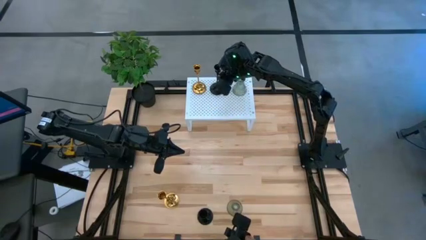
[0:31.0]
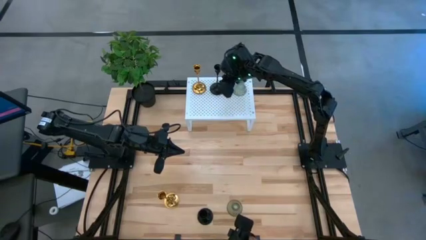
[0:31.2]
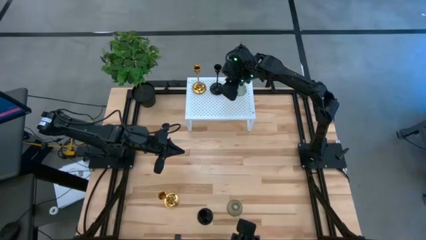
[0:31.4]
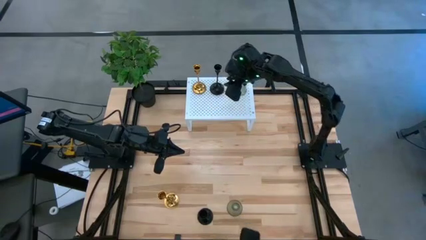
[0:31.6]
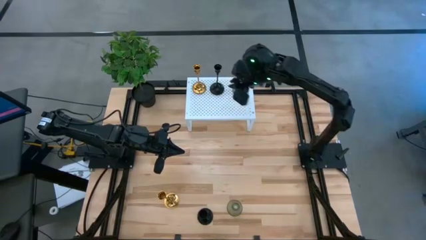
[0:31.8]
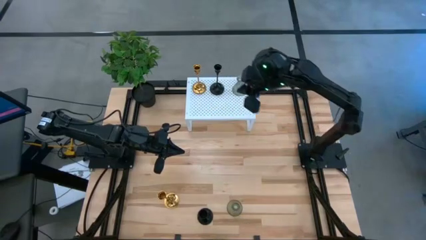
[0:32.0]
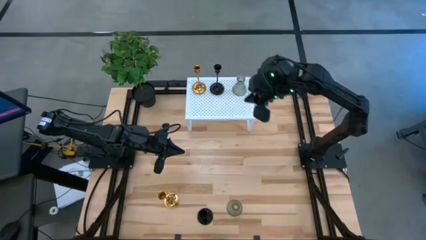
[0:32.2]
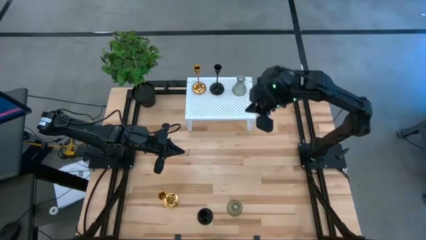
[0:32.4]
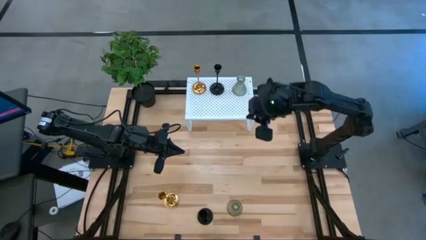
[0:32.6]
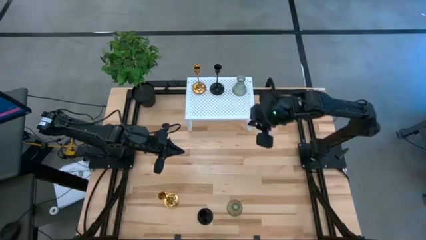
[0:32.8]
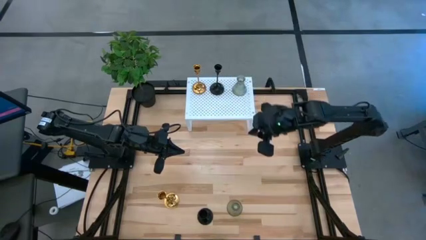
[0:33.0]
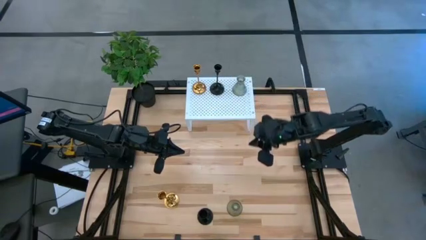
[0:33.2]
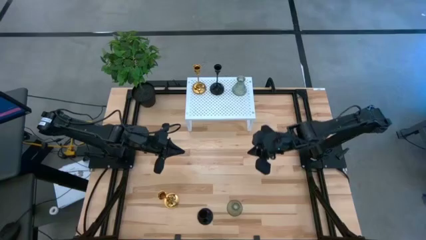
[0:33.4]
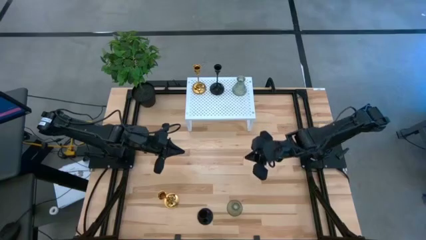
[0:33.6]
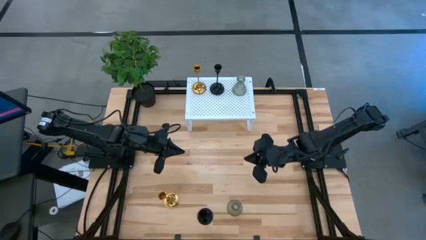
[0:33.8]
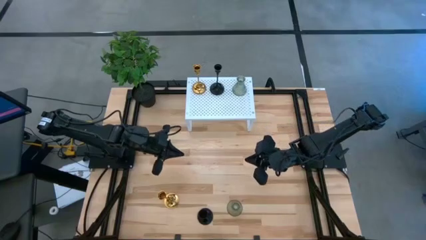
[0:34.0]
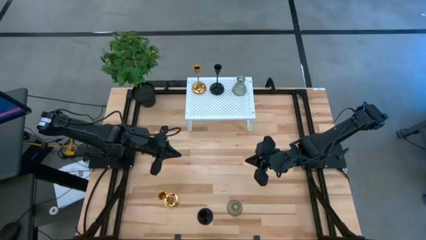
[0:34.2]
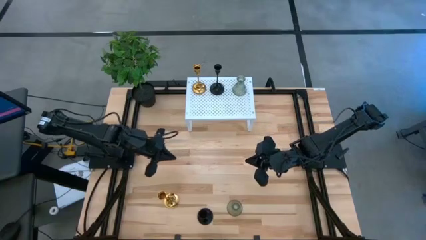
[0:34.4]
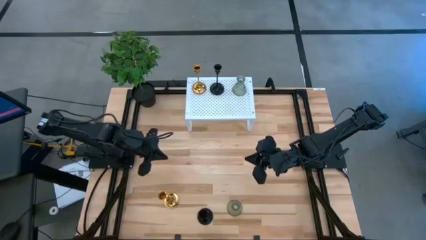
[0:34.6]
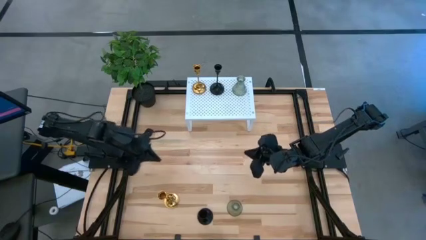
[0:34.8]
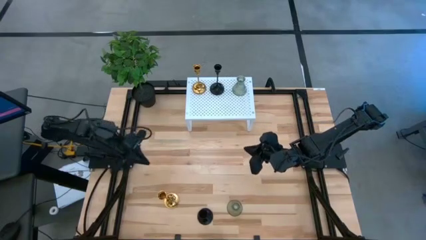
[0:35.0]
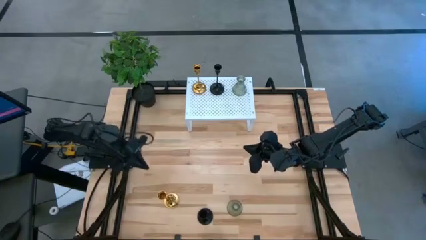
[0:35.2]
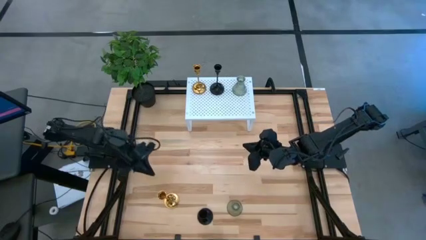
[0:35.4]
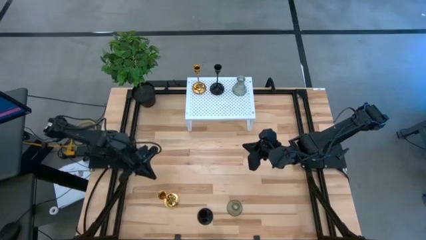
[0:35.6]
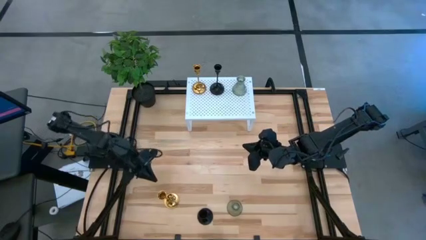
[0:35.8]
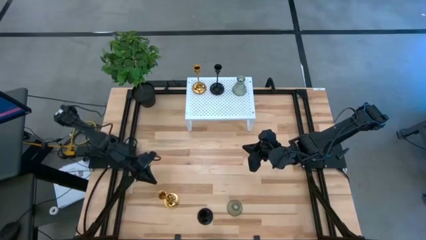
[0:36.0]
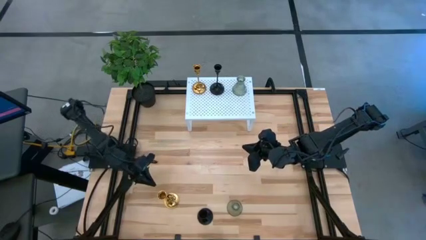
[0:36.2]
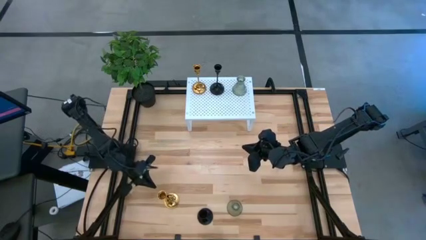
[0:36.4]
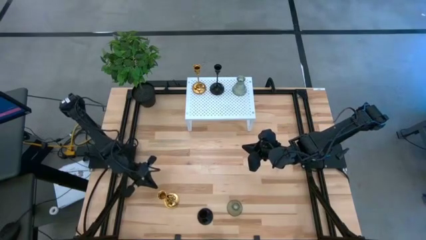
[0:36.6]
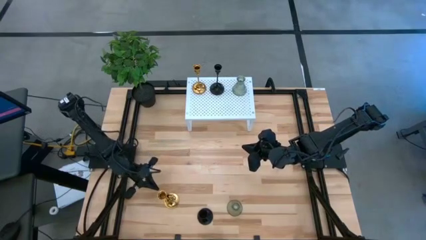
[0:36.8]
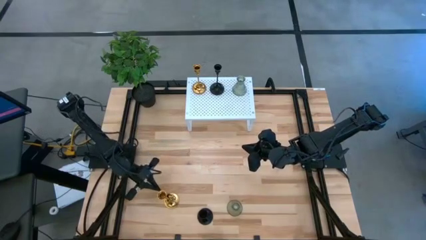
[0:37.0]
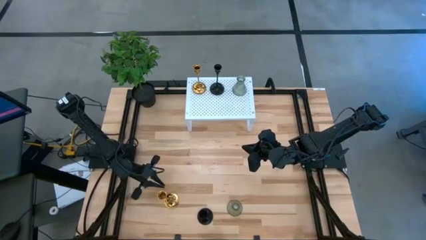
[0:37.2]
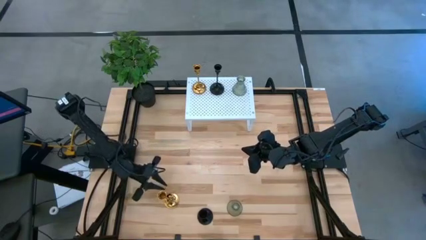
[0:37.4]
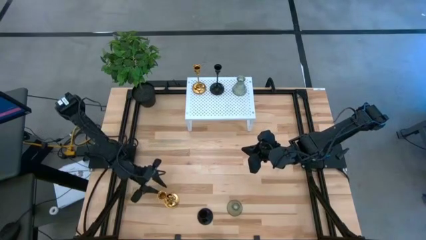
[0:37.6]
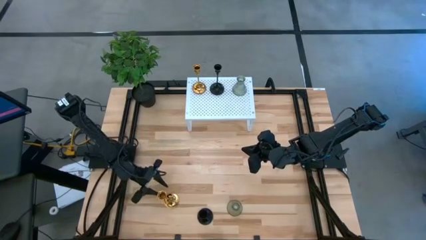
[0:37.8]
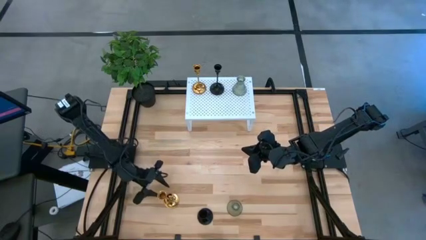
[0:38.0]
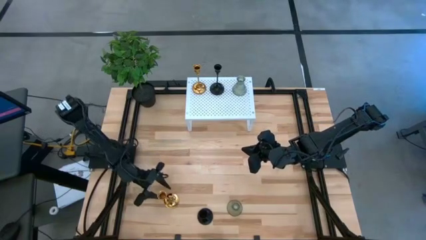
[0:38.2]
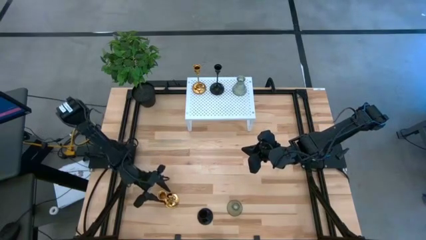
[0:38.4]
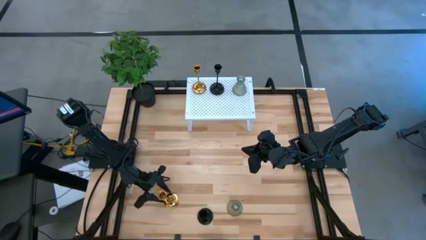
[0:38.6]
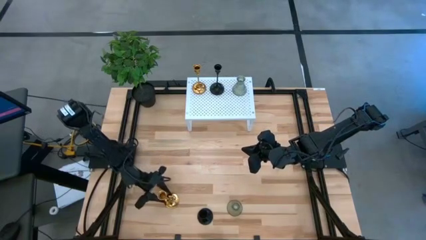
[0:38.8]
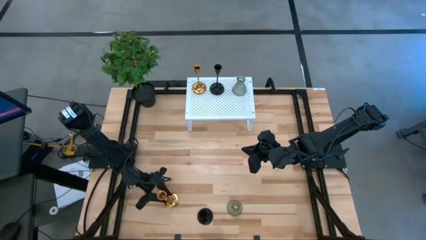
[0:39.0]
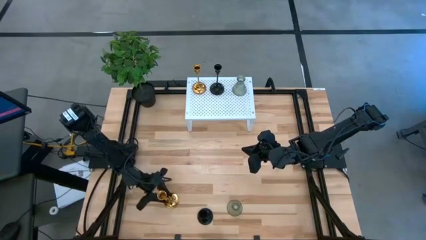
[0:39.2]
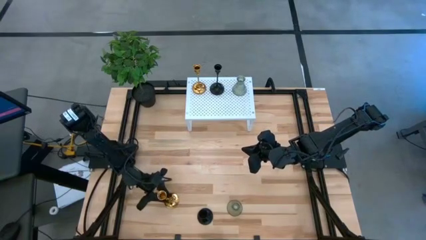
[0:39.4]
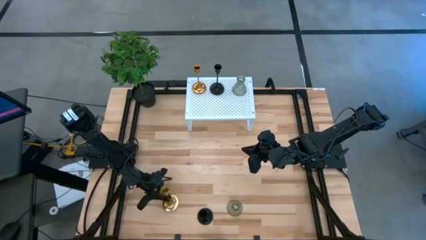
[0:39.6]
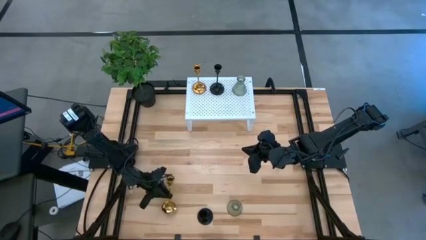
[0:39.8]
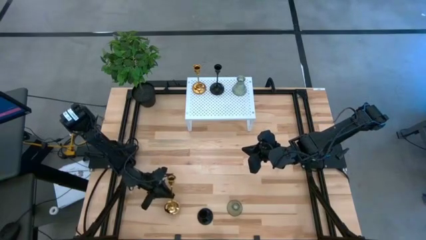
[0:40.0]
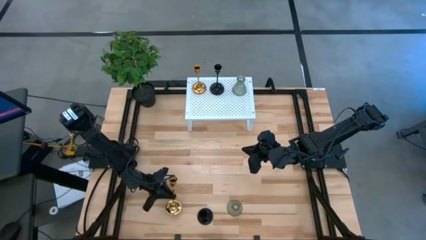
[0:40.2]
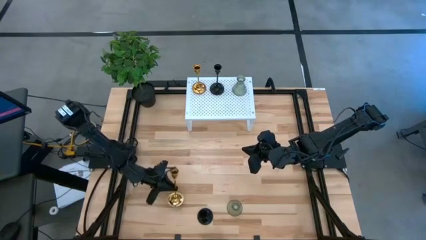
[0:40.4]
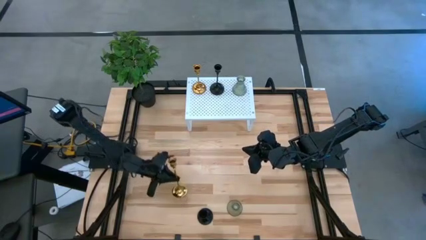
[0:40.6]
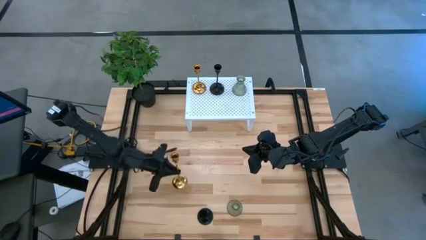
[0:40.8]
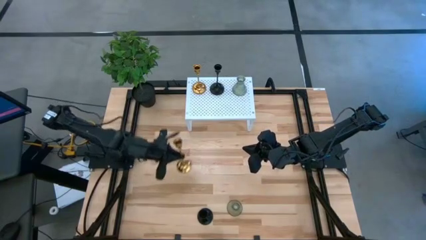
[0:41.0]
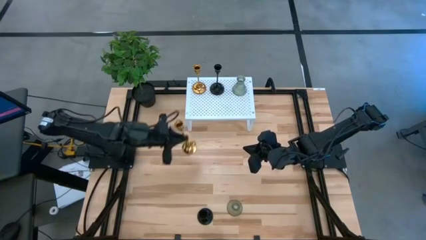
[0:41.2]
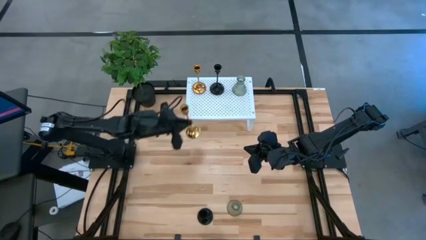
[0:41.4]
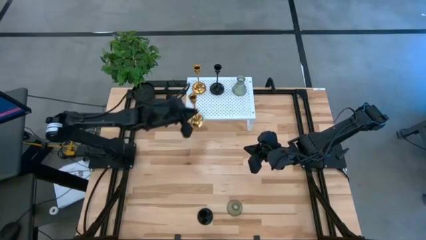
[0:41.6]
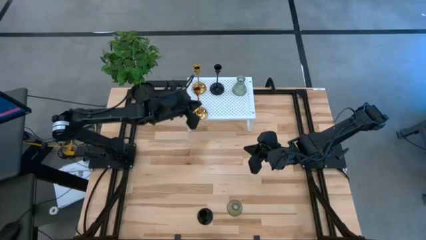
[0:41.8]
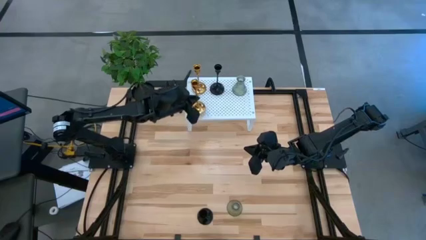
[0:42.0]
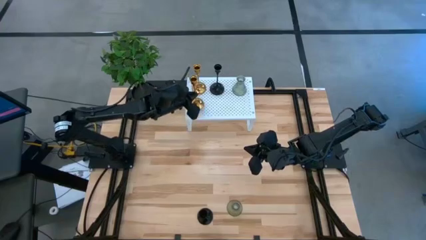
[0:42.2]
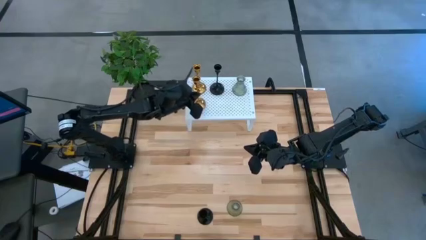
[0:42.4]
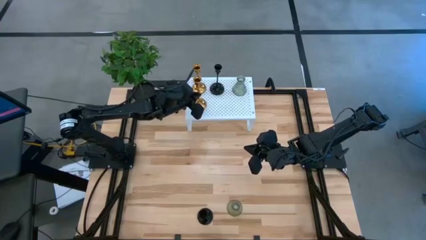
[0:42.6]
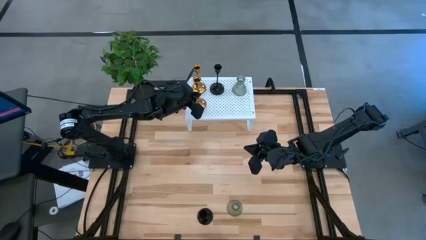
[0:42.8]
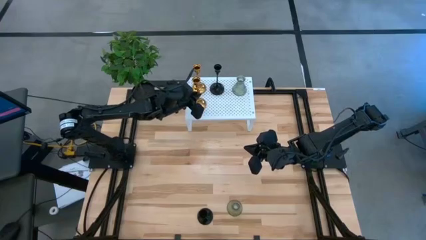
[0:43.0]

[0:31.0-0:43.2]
Task: Pick & Place candle stick holders
Put the gold candle holder on the shelf aligned with the other gold candle holder

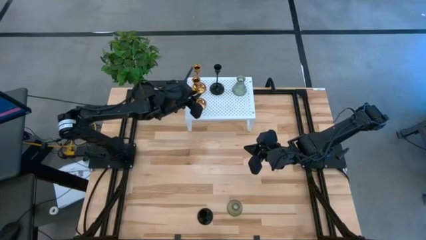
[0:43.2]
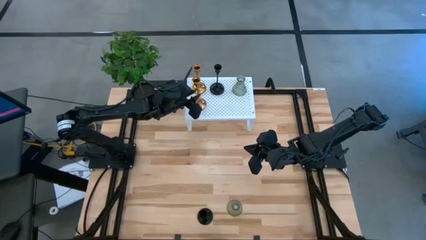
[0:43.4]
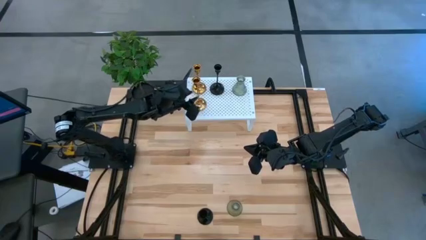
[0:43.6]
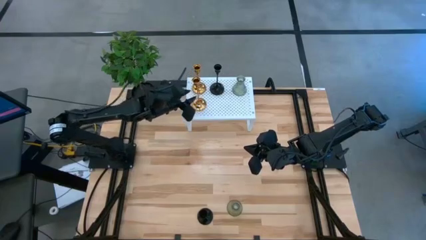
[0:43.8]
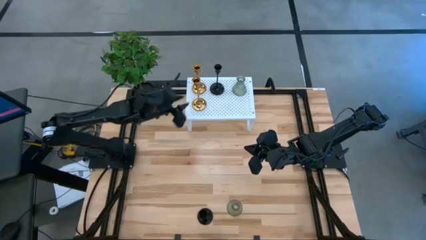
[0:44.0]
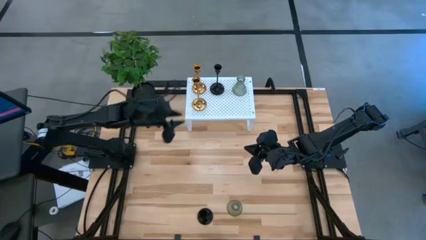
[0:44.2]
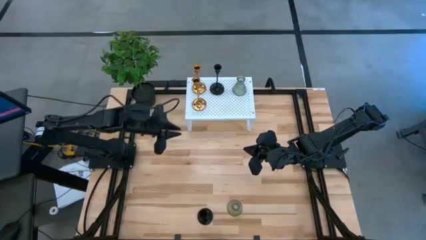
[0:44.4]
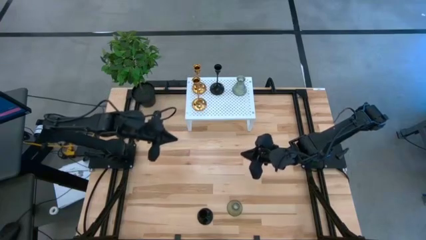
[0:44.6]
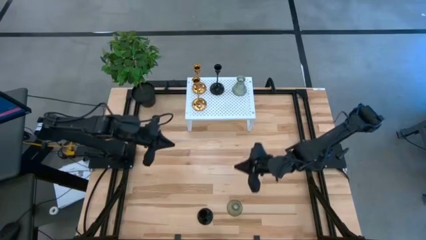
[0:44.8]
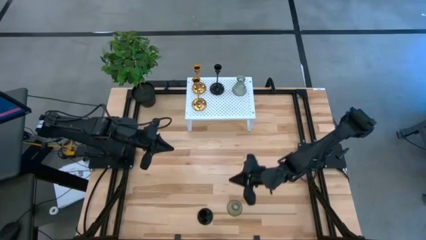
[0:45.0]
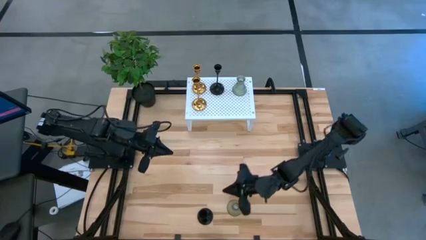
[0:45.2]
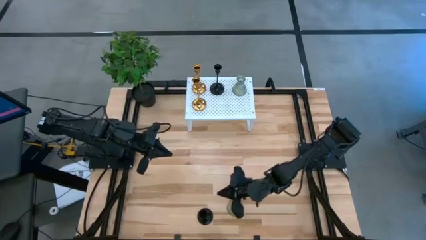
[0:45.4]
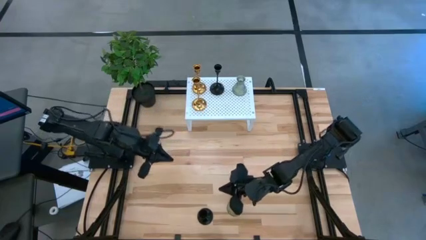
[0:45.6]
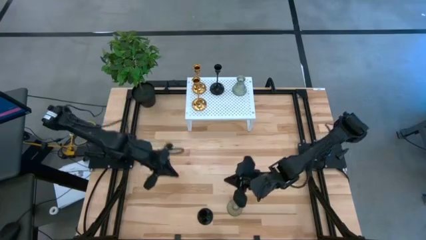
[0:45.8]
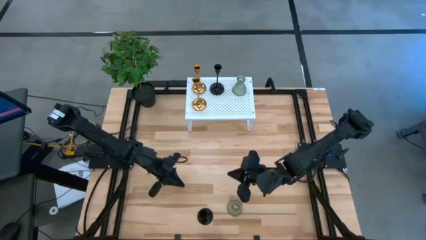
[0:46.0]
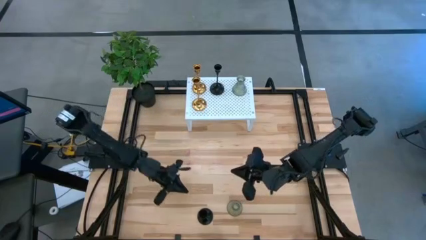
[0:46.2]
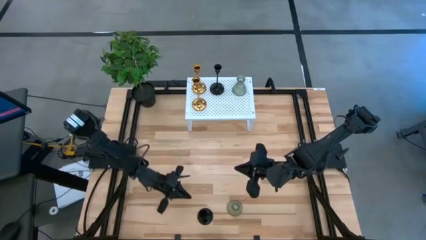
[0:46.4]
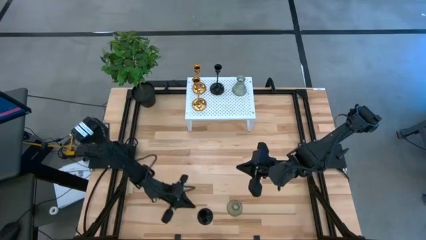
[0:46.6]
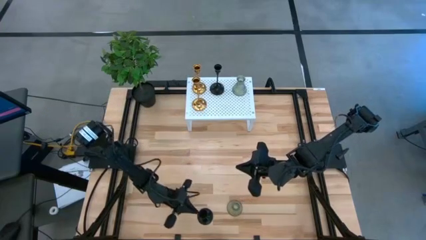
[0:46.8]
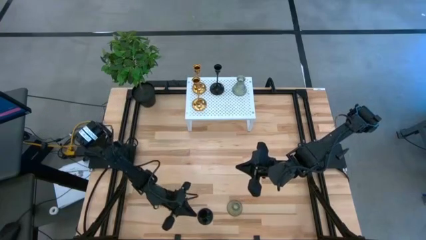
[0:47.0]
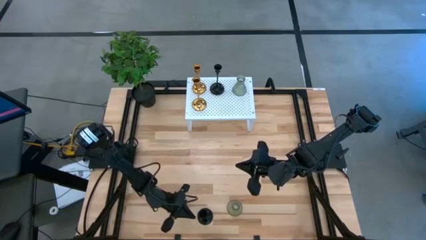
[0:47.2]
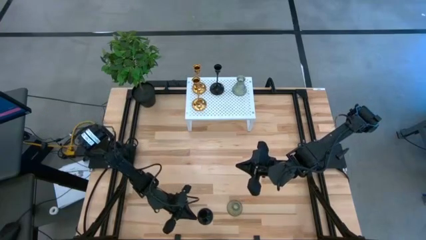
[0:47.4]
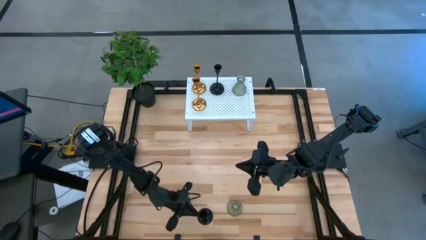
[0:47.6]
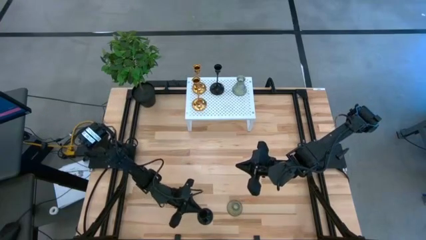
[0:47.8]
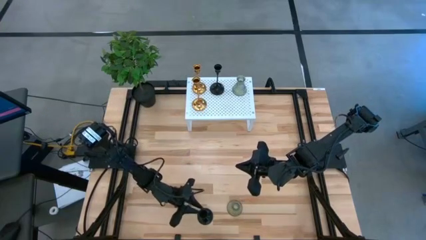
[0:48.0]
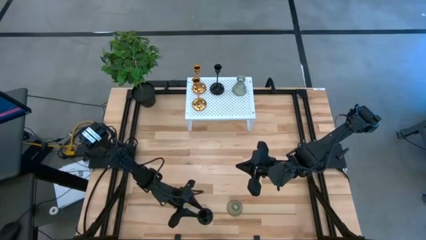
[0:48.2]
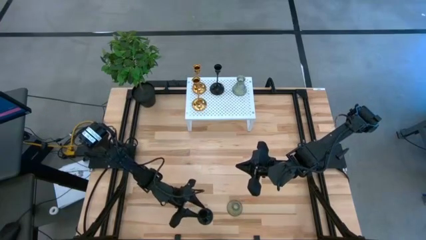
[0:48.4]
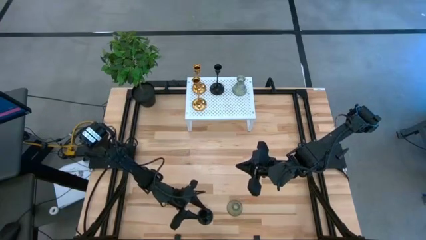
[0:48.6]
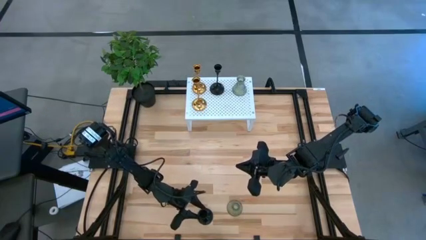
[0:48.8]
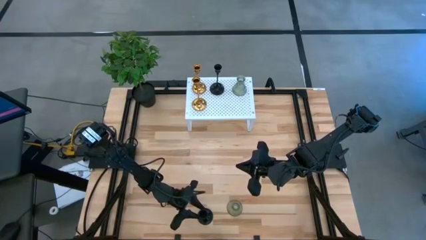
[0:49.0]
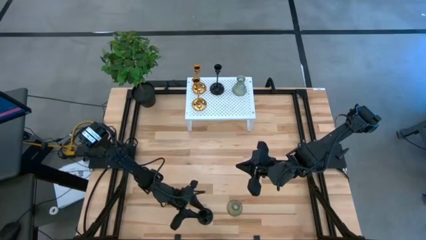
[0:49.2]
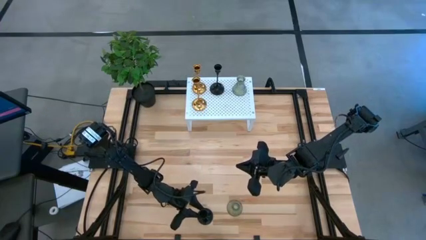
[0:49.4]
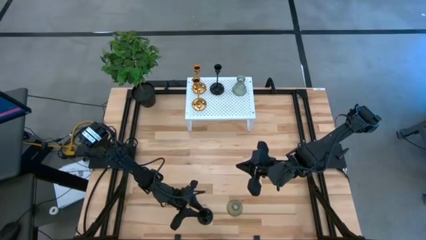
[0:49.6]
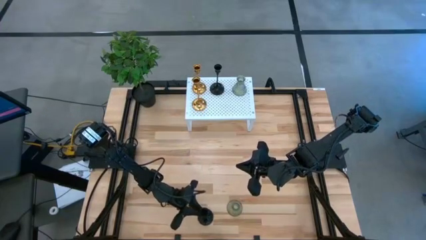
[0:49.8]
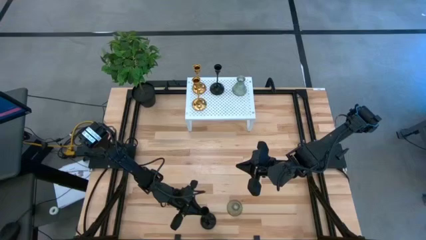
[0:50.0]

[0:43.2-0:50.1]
Put the black candle holder on the shelf aligned with the other black candle holder
